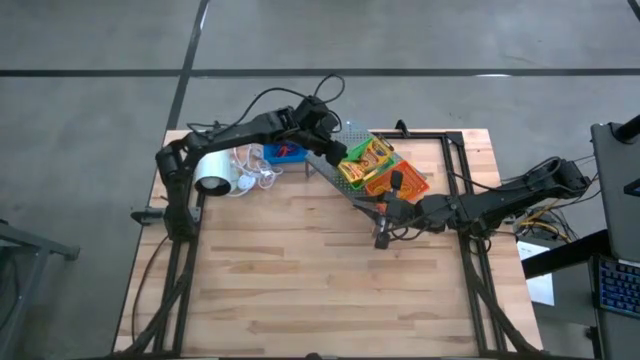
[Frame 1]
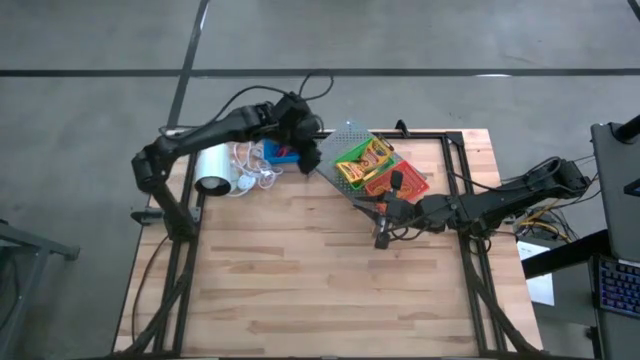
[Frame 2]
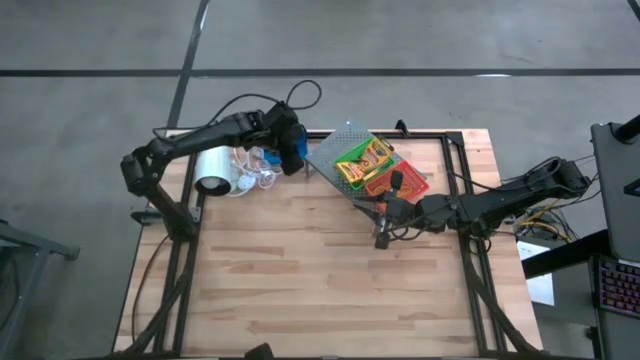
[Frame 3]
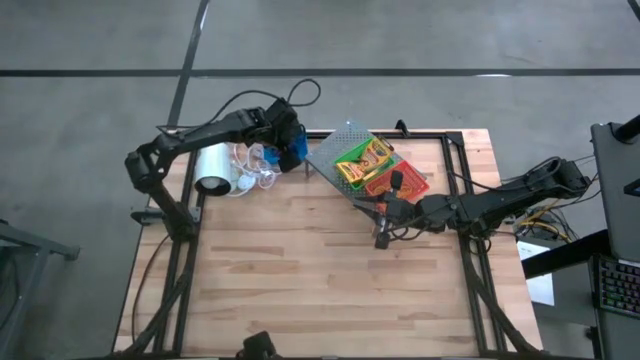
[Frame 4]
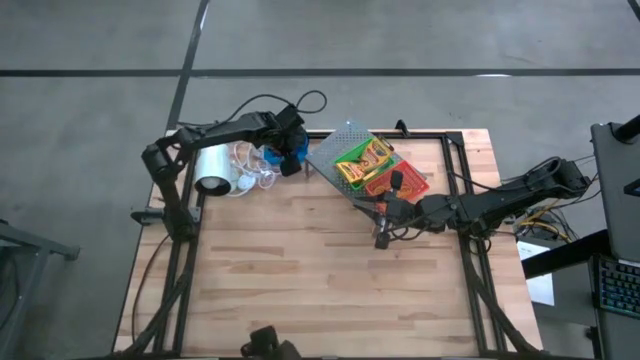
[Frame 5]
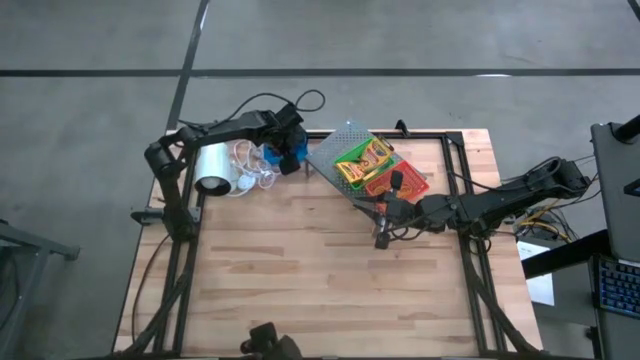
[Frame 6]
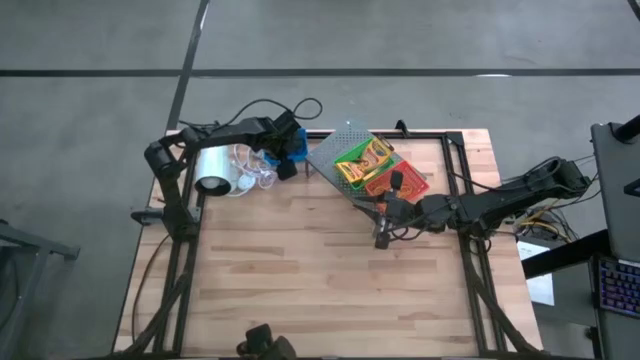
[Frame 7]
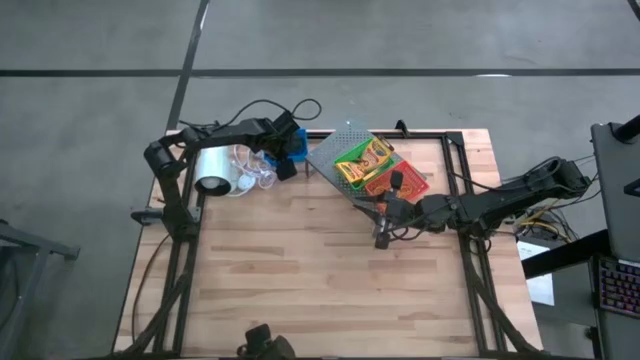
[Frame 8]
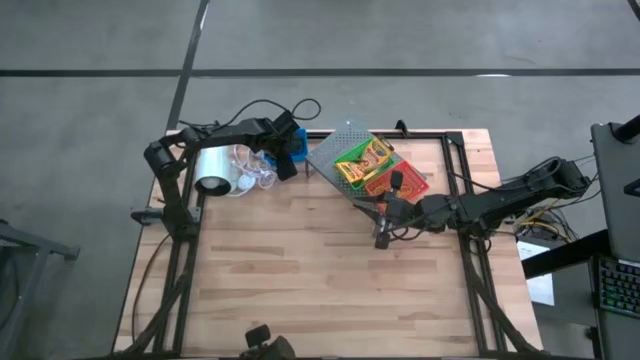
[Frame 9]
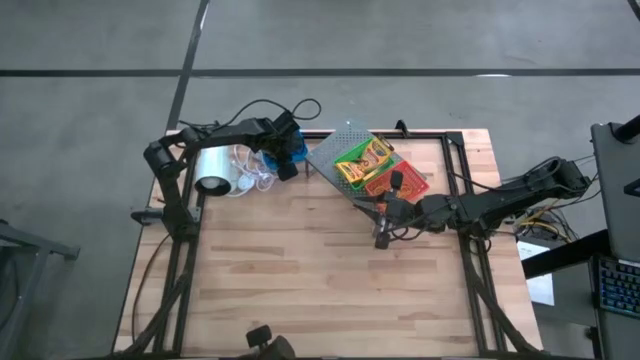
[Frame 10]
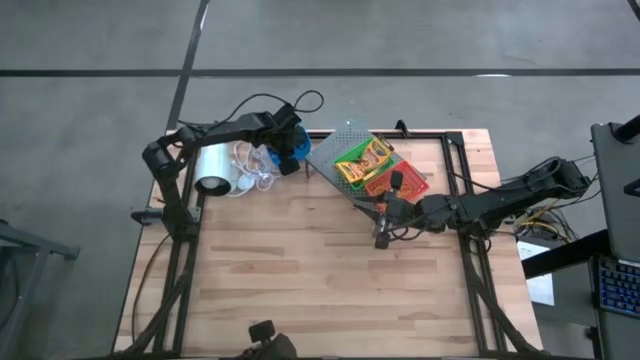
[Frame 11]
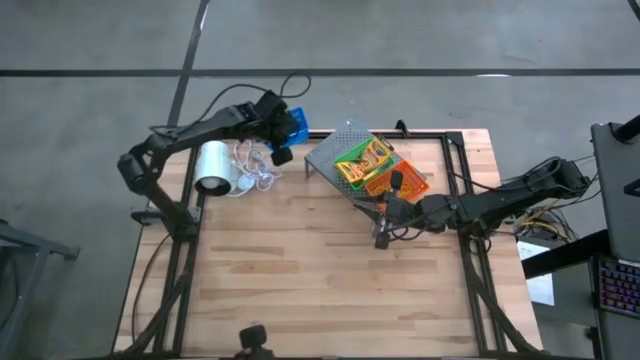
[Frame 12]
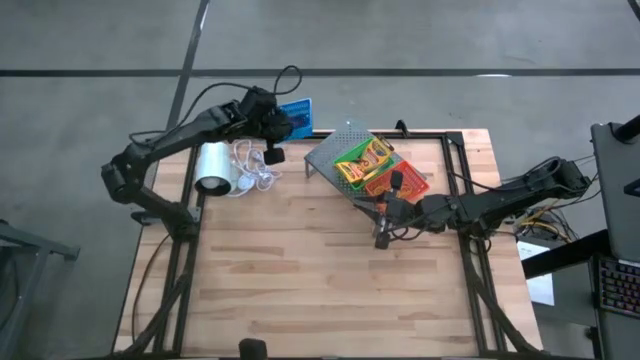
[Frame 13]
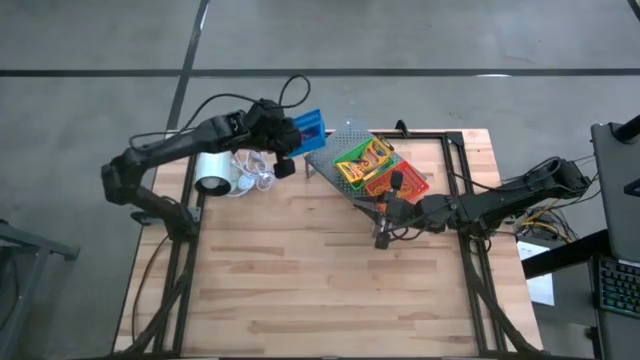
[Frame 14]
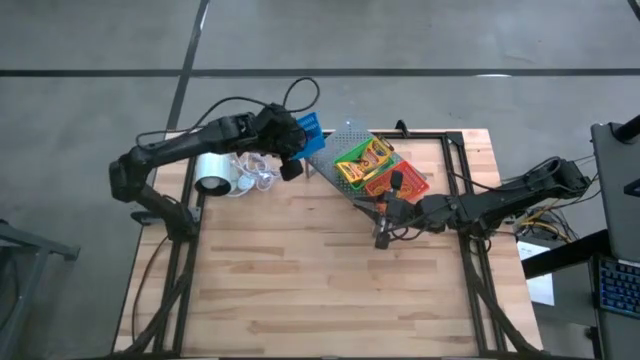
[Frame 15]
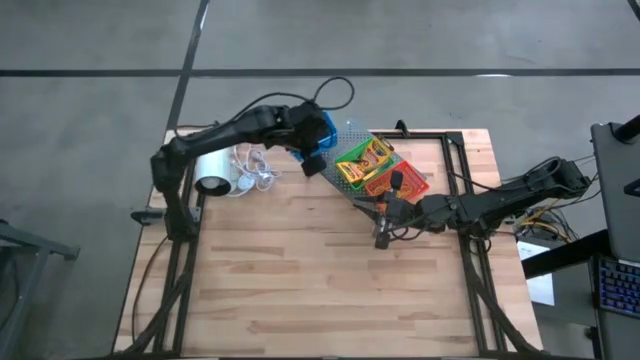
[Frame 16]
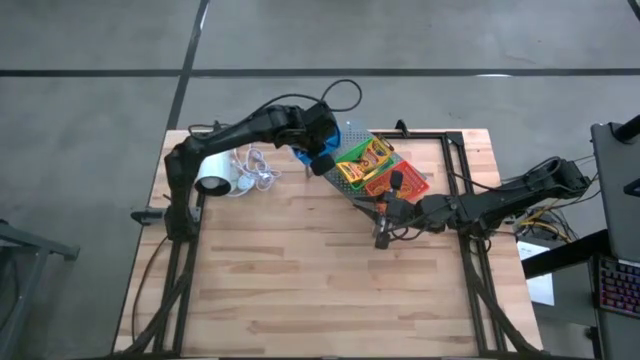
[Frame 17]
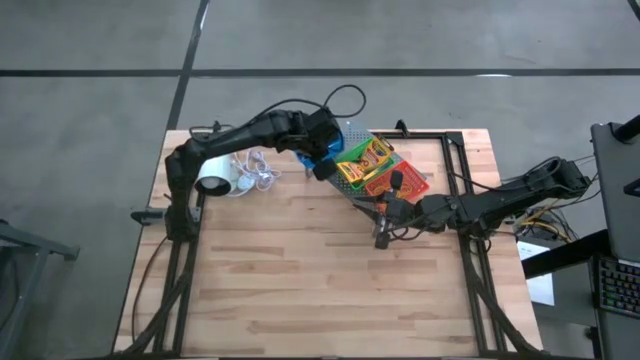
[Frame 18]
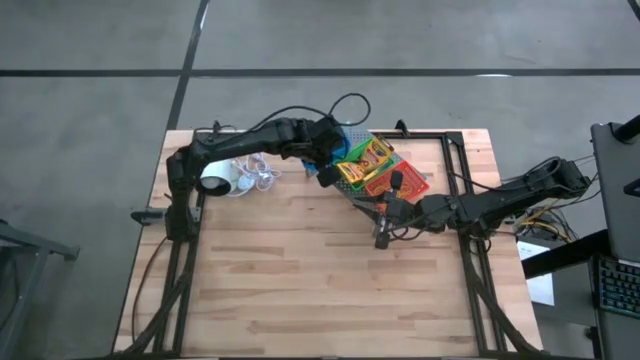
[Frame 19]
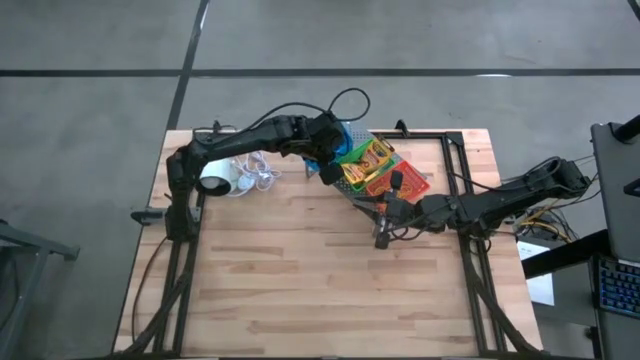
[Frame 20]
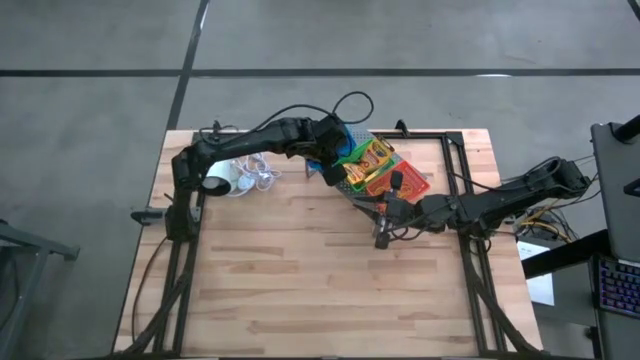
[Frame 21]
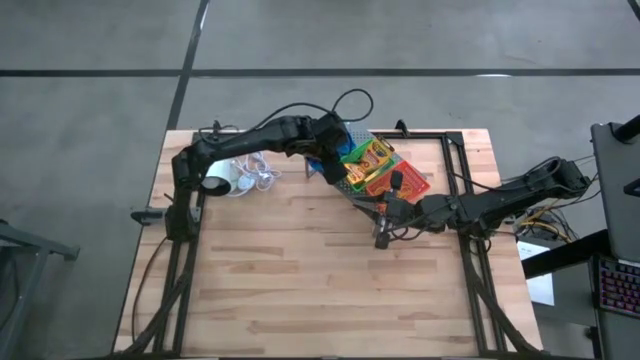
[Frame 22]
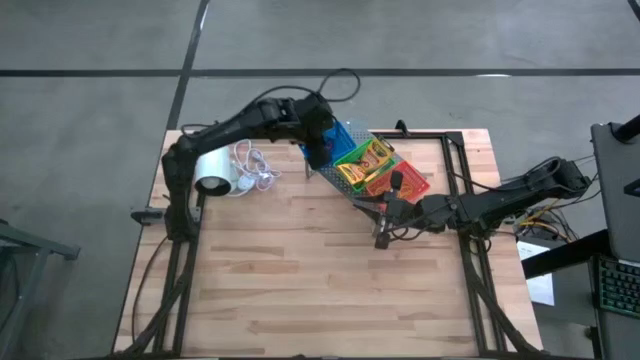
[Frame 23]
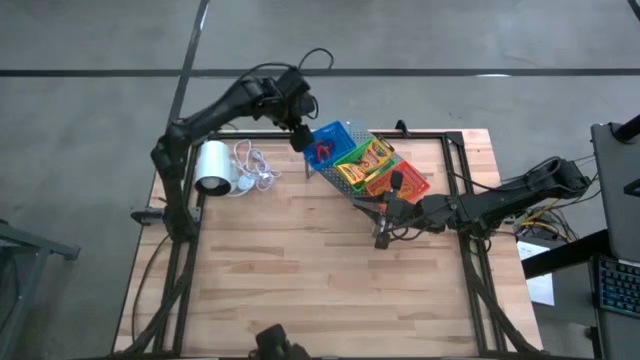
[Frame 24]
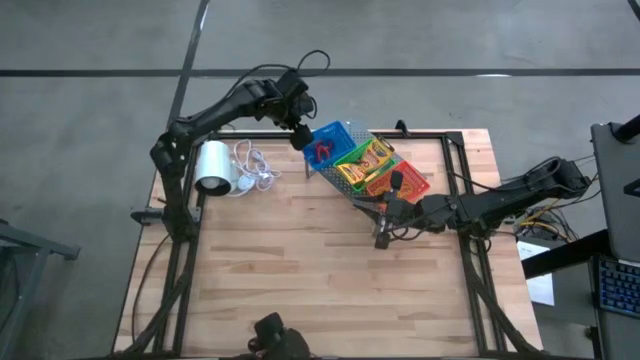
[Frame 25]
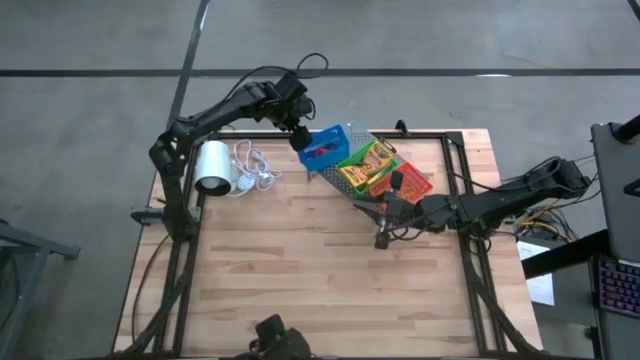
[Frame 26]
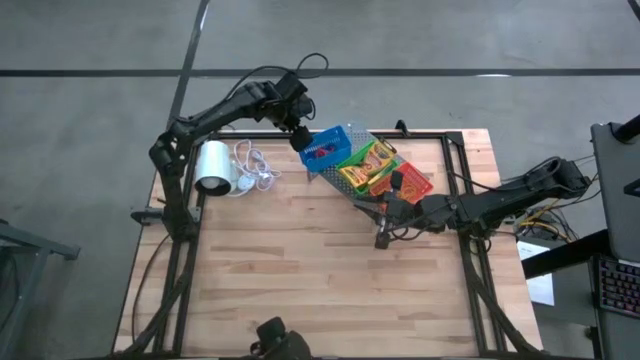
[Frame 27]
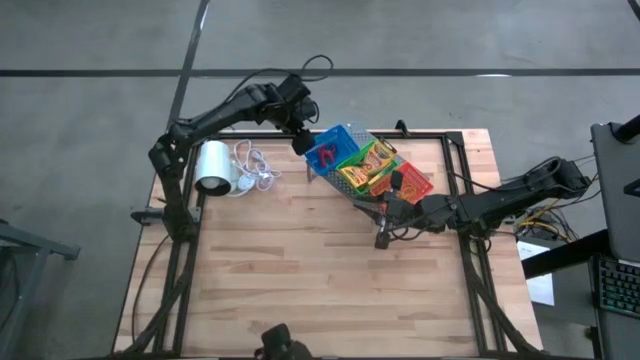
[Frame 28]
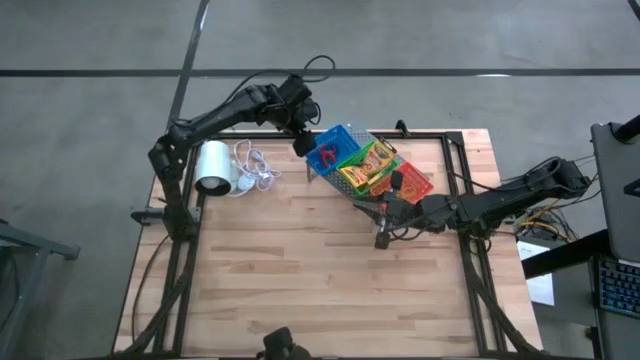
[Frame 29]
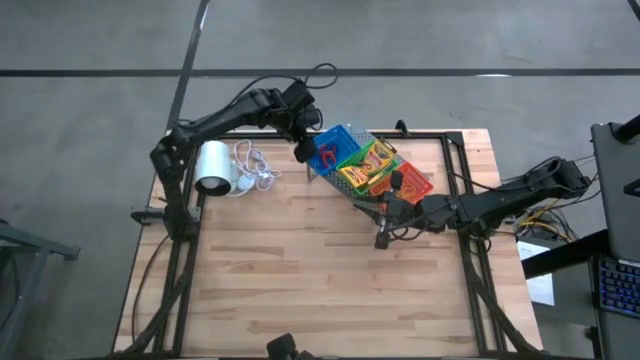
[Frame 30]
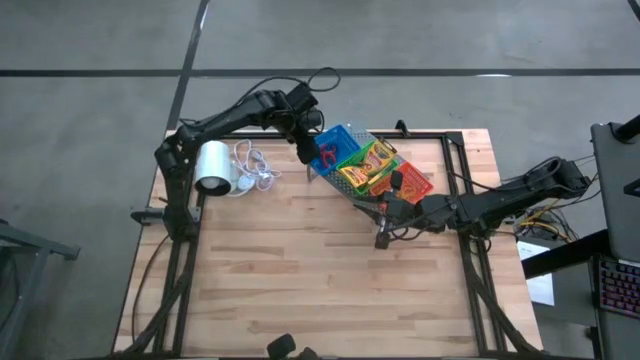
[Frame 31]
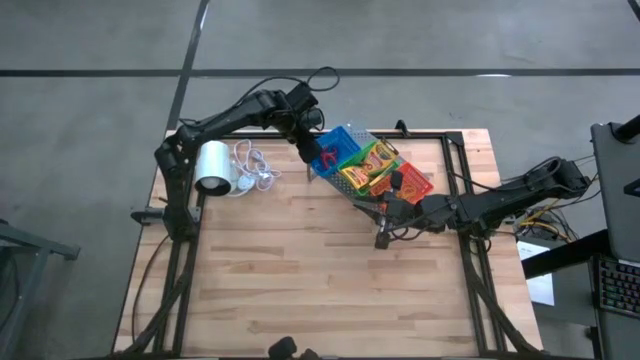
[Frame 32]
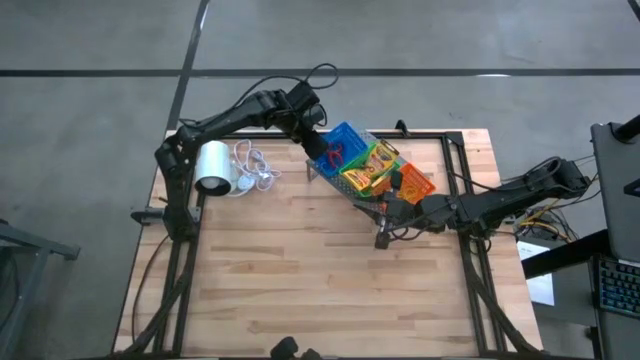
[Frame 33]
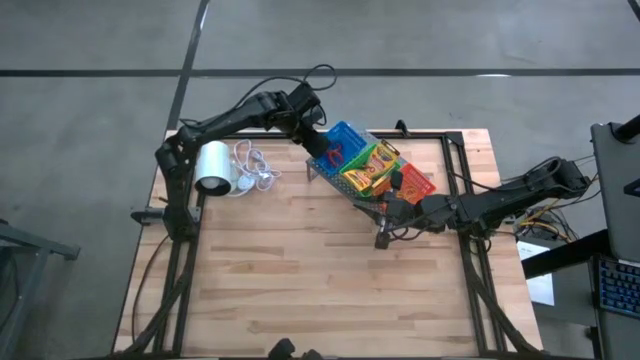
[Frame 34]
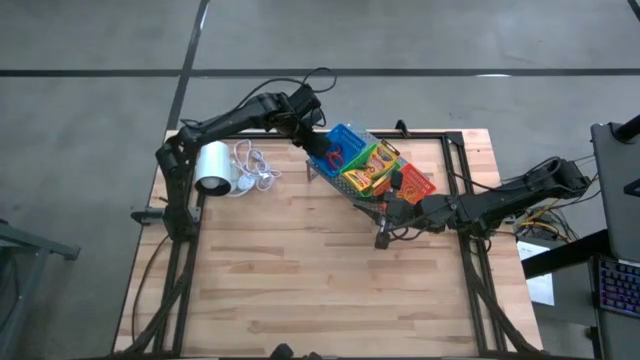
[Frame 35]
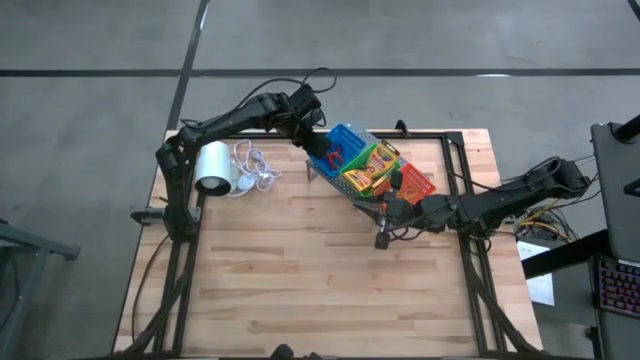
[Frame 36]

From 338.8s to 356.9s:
Task: Pick & Place Office Desk Supplies
Put the blue bin on the shelf

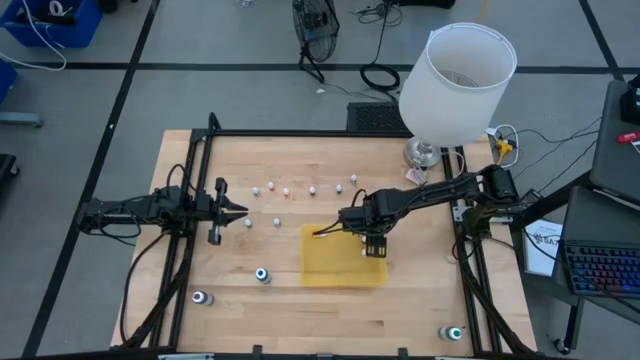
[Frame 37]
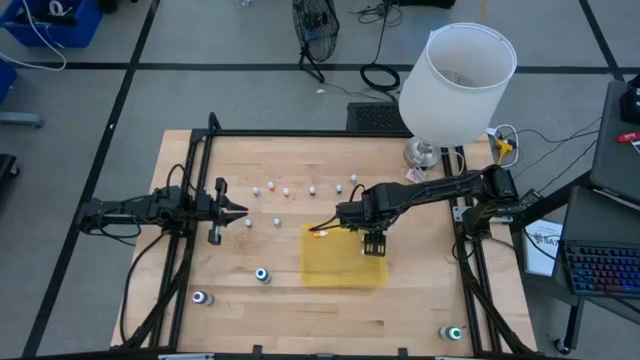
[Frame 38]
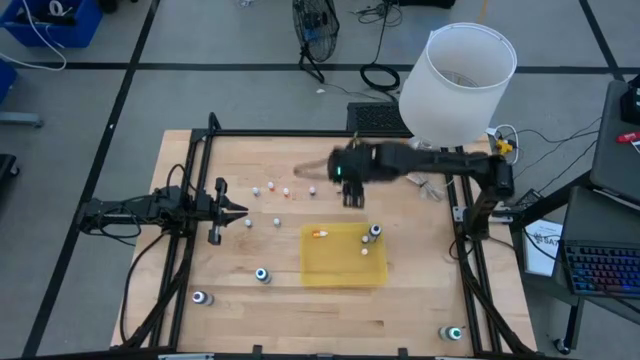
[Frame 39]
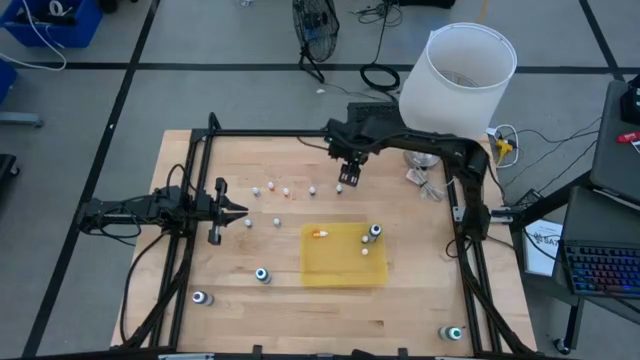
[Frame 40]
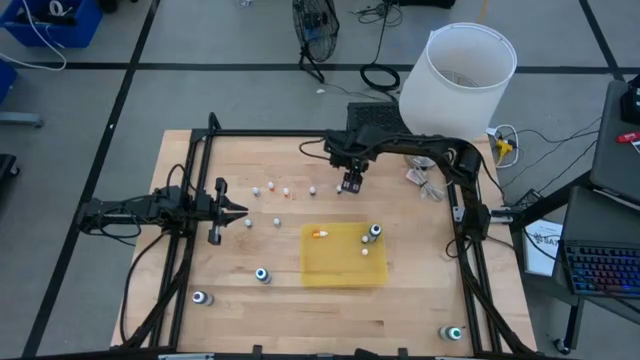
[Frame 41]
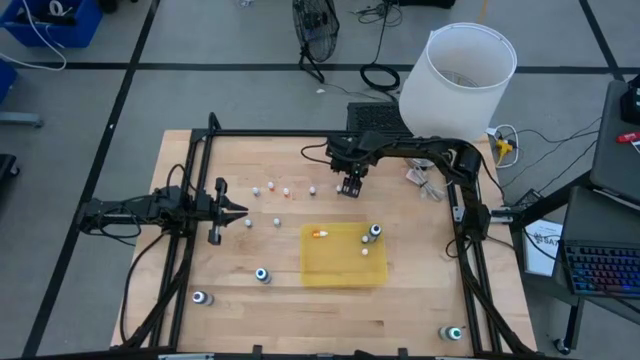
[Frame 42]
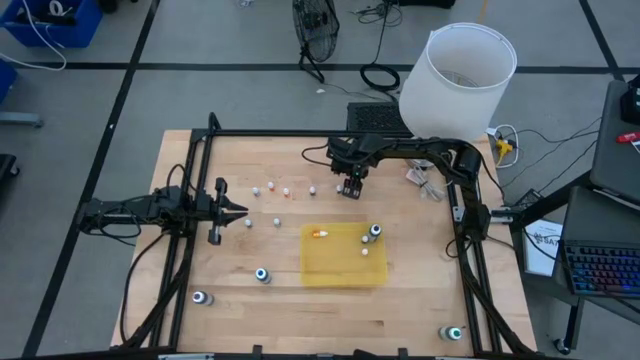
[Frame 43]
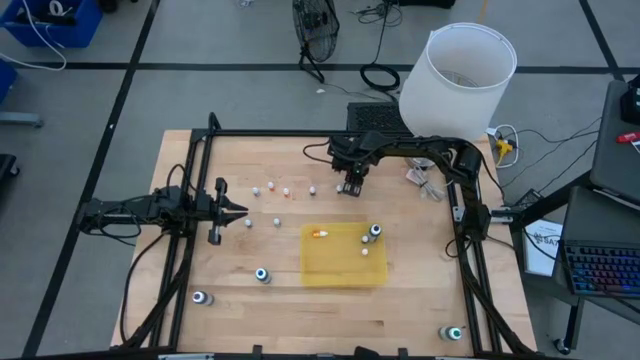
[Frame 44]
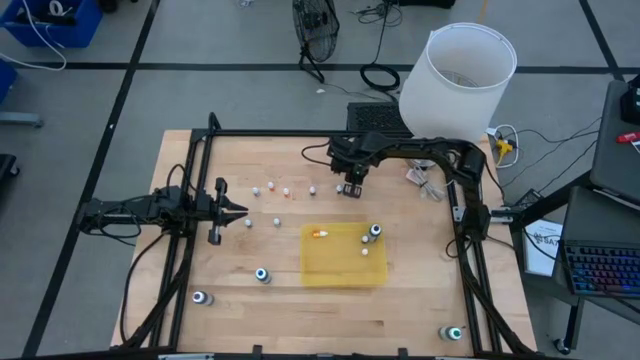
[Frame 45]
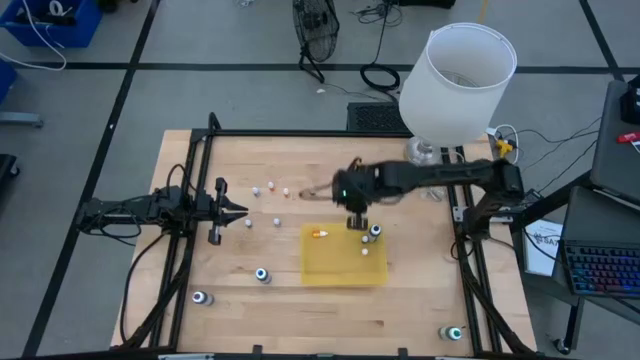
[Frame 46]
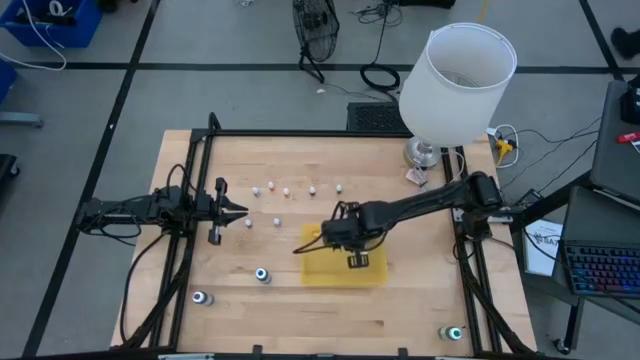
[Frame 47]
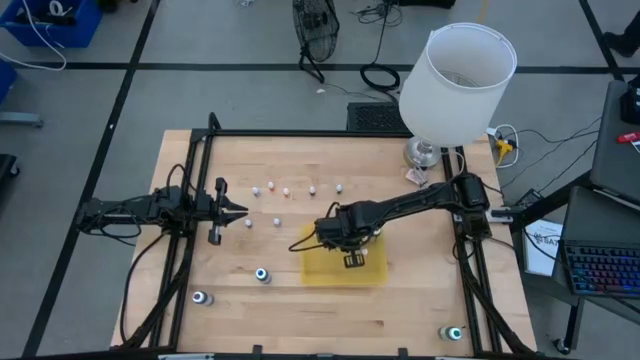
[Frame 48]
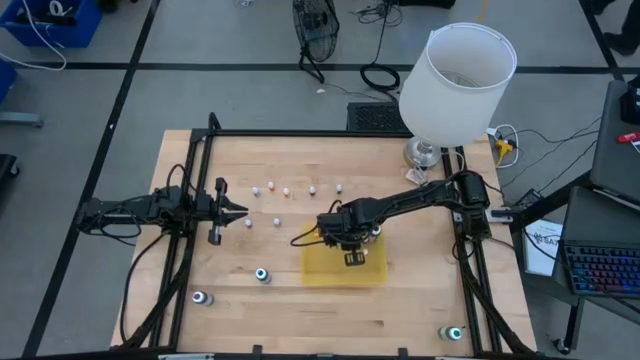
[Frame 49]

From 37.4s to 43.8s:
Task: Pick & Place food coloring
Put the small purple food coloring bottle into the yellow bin
